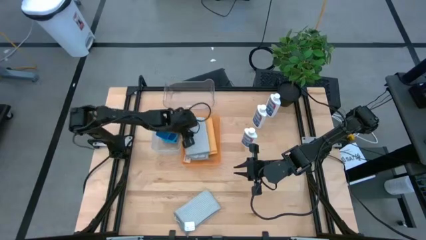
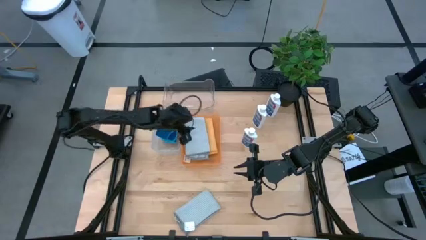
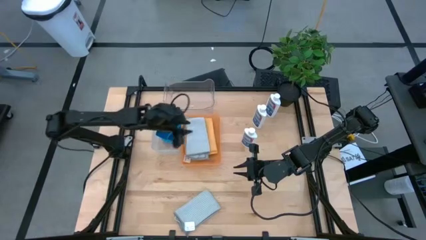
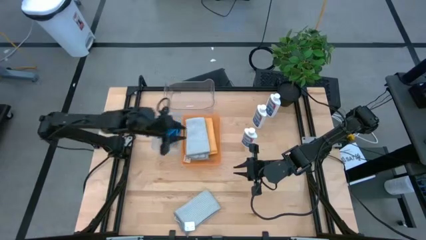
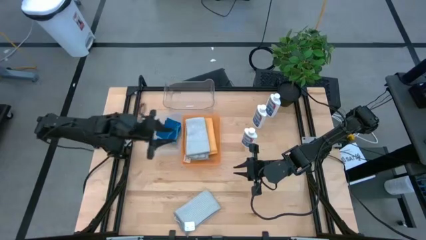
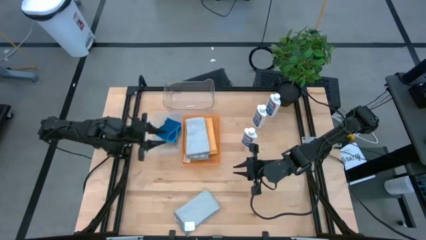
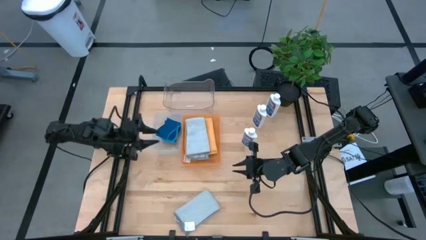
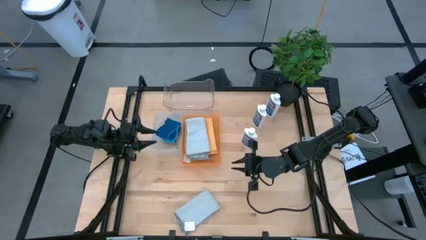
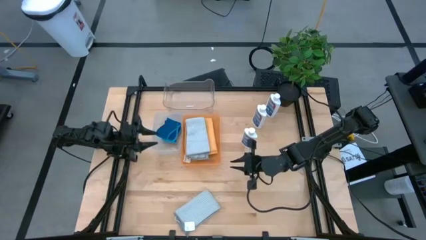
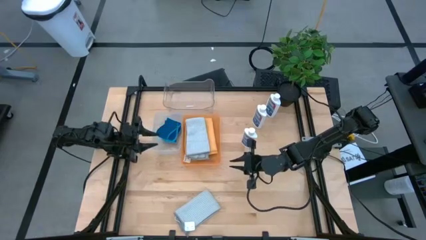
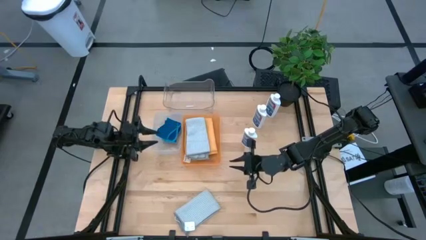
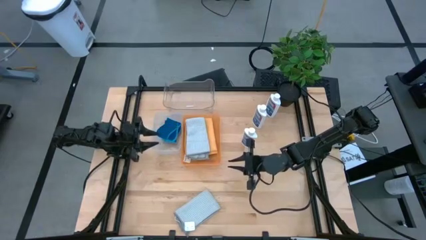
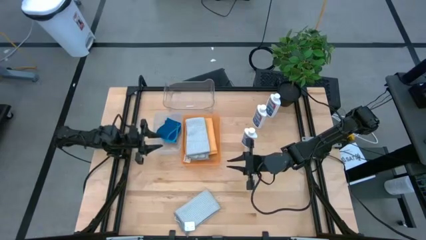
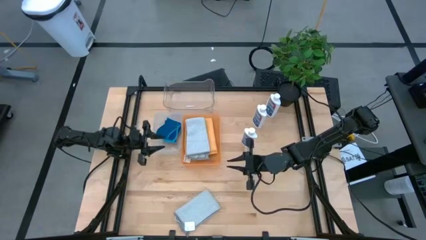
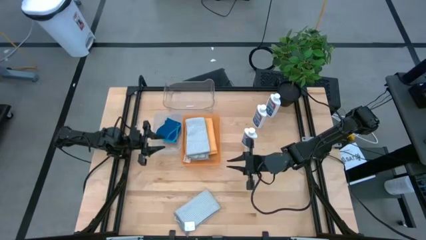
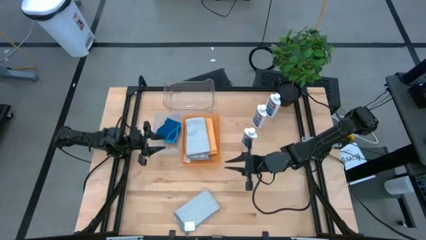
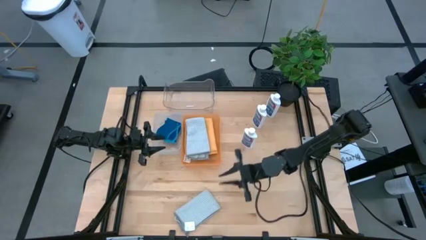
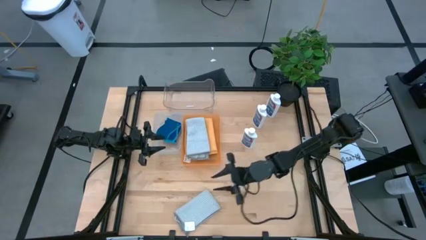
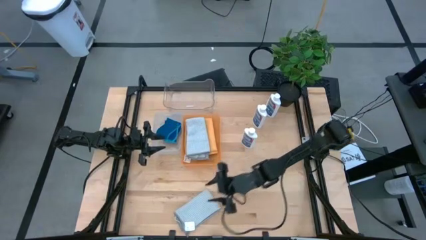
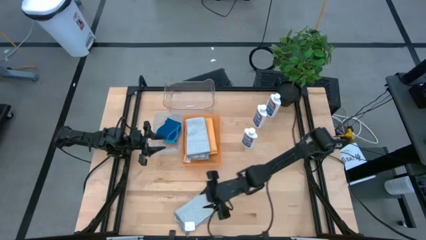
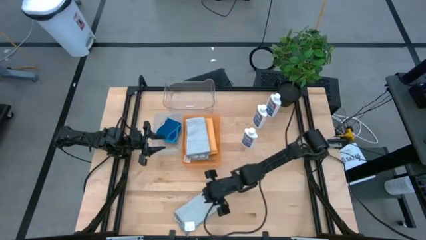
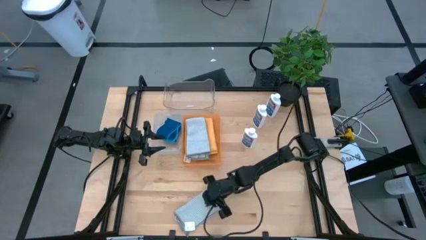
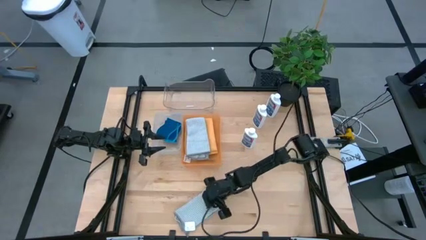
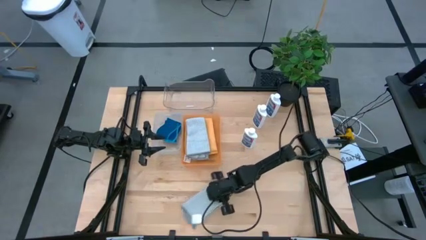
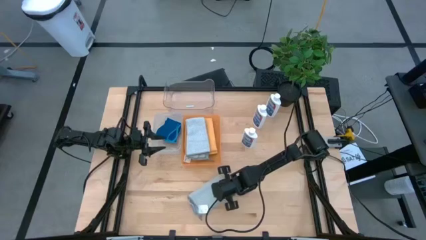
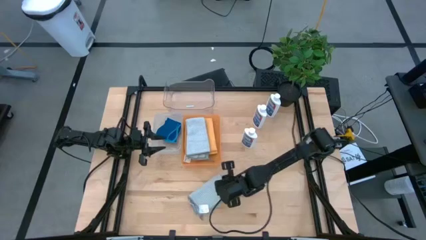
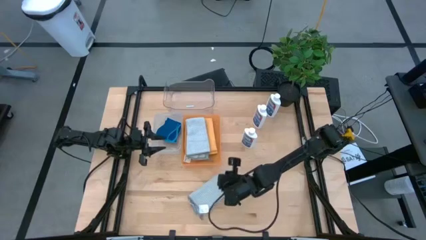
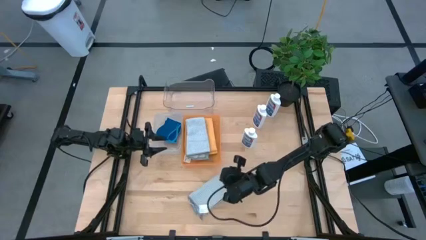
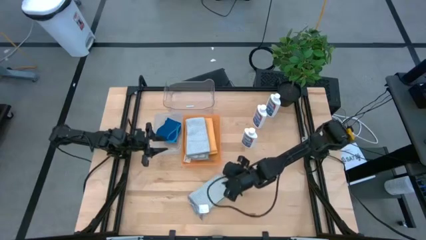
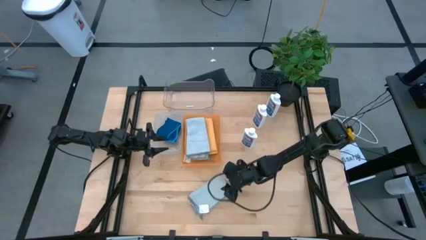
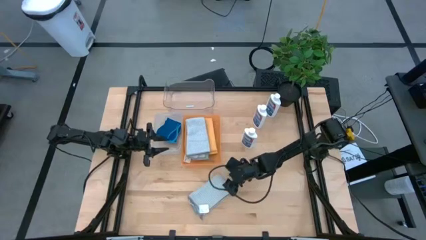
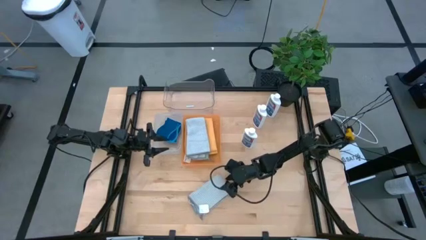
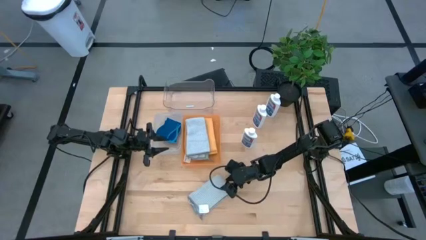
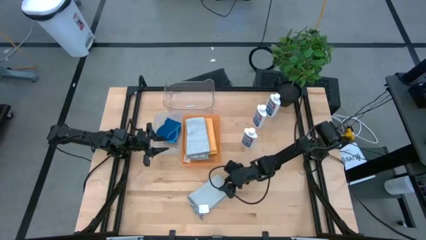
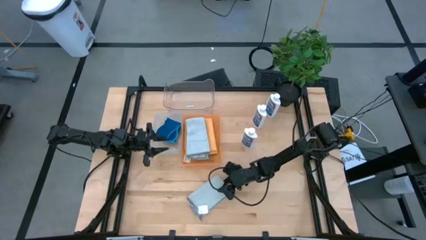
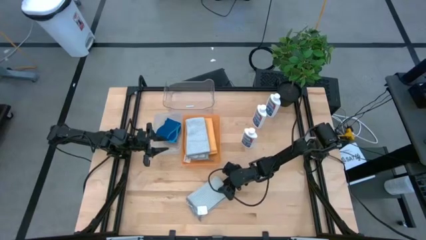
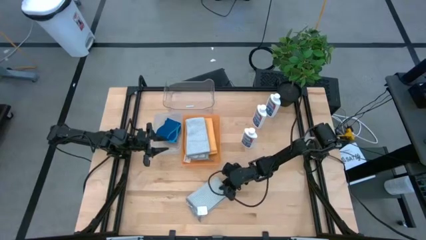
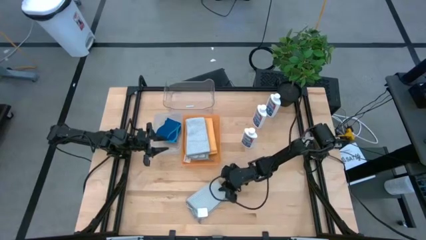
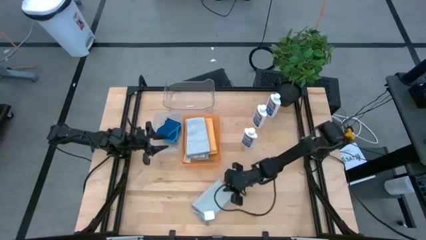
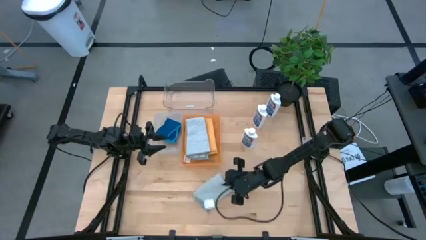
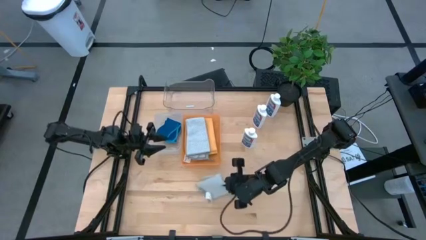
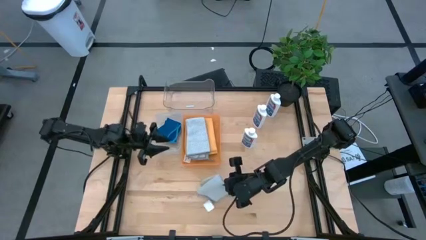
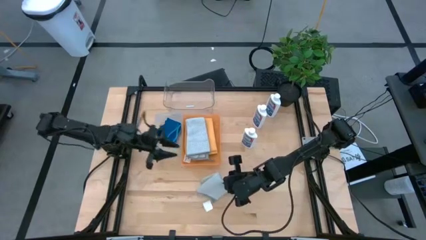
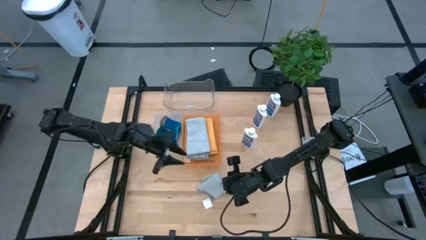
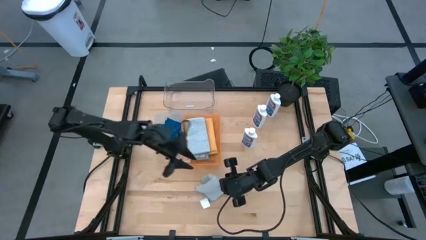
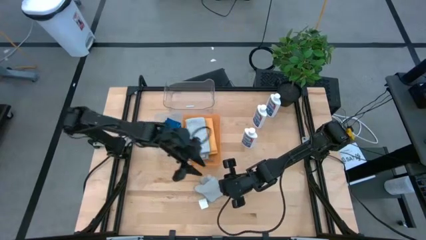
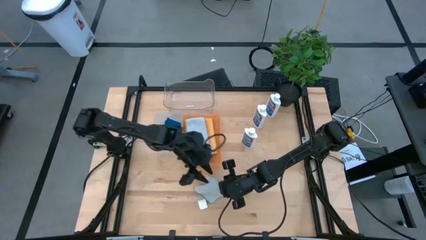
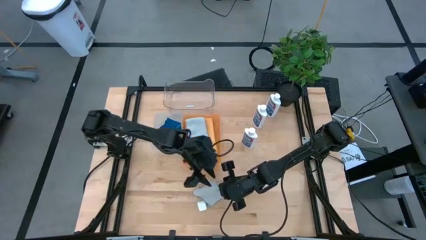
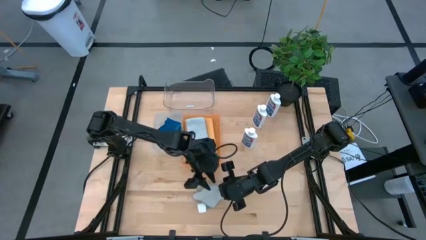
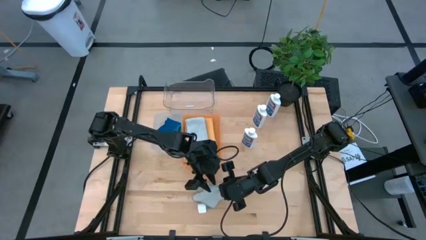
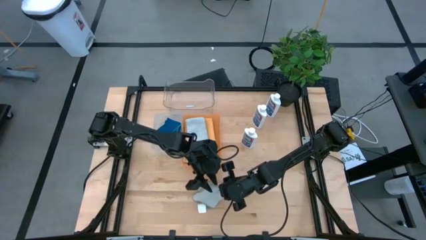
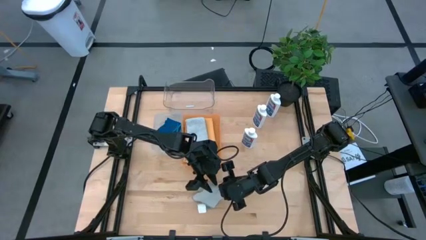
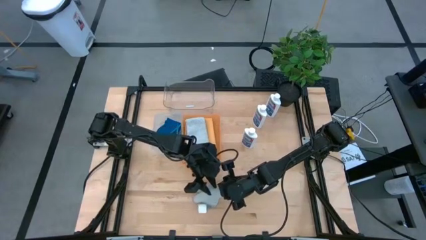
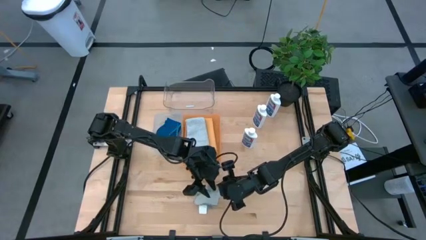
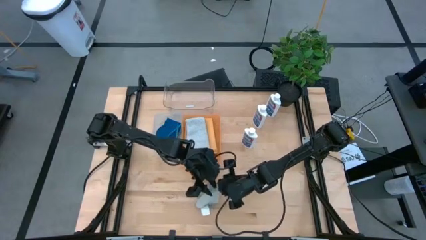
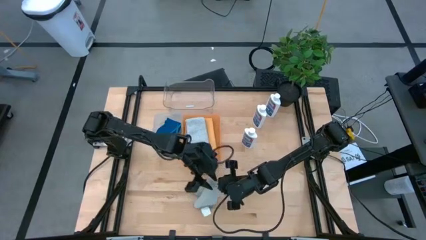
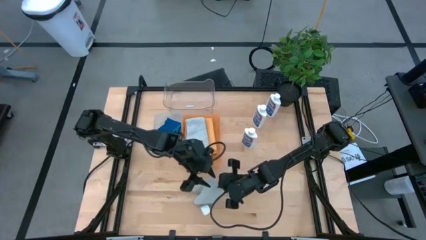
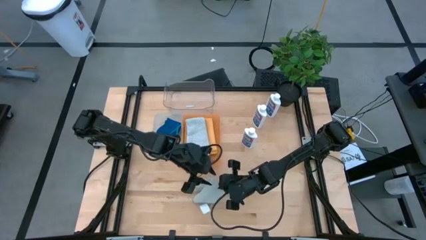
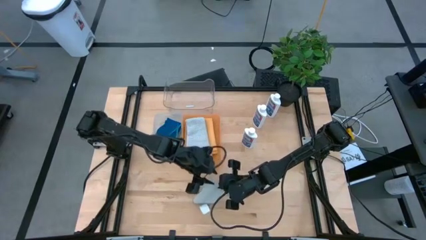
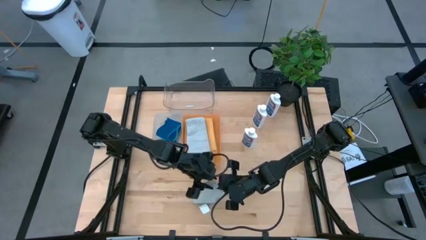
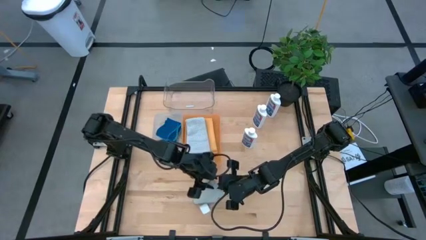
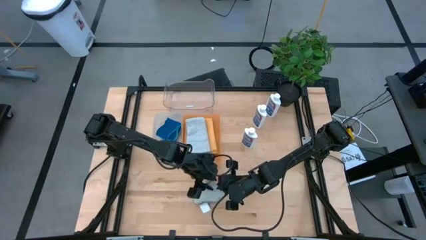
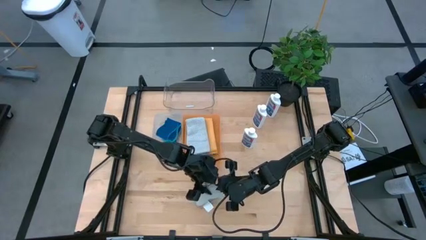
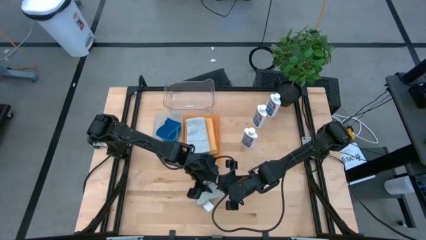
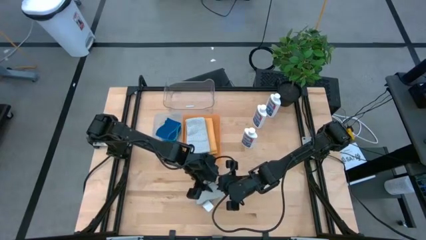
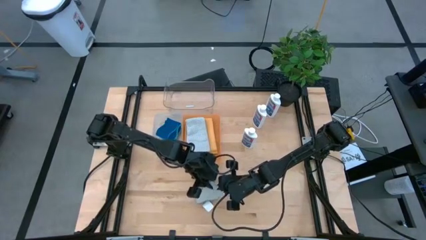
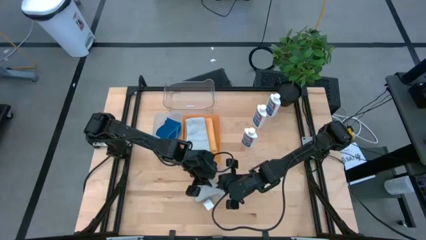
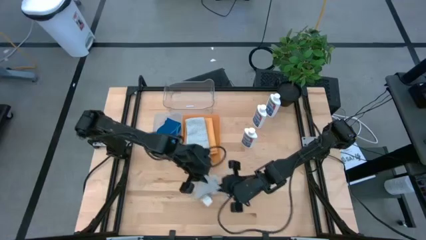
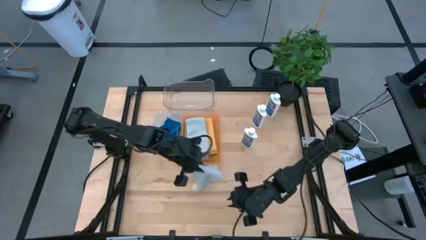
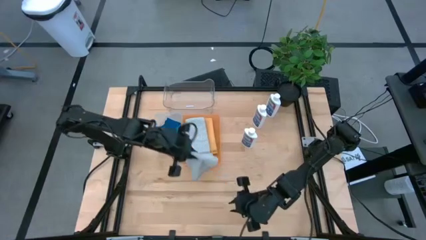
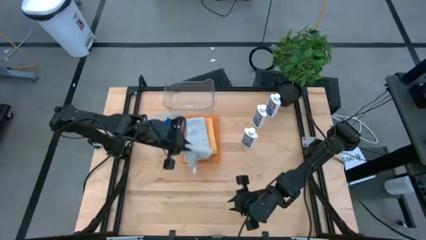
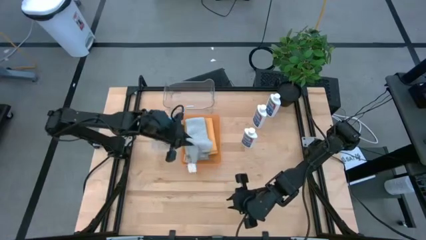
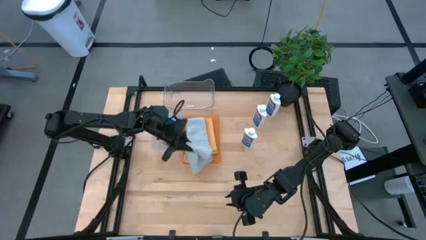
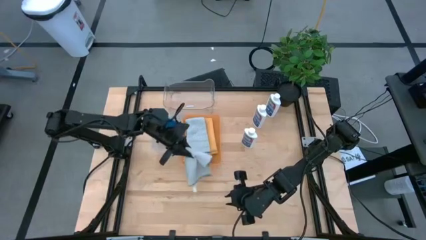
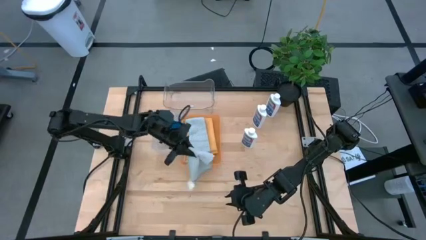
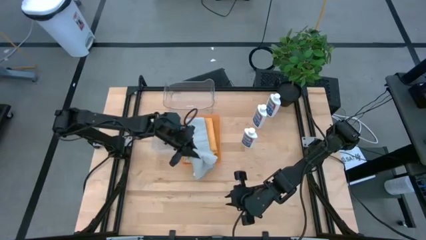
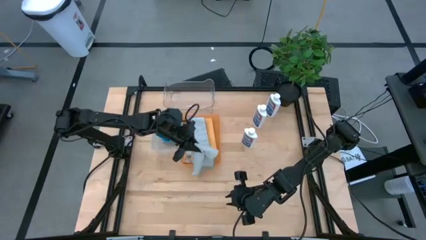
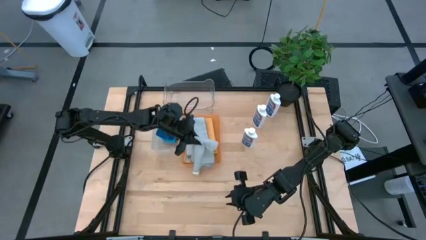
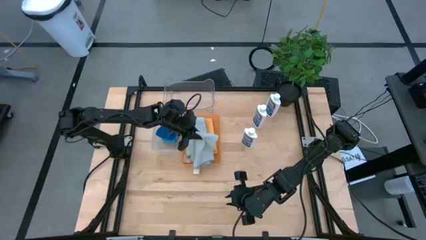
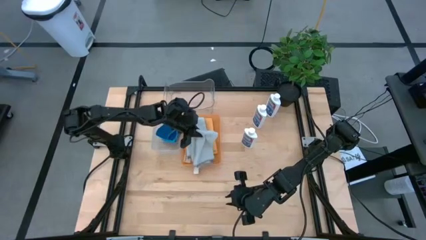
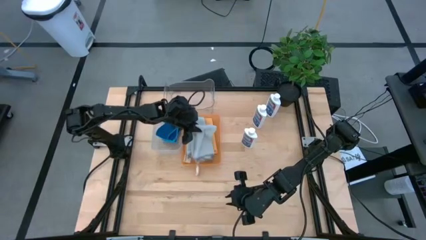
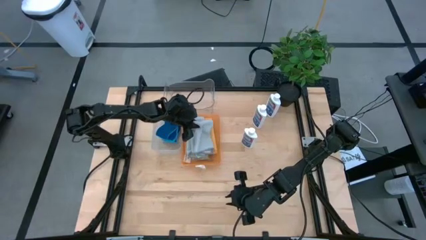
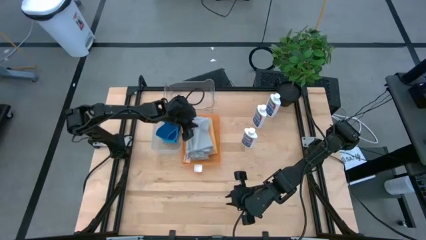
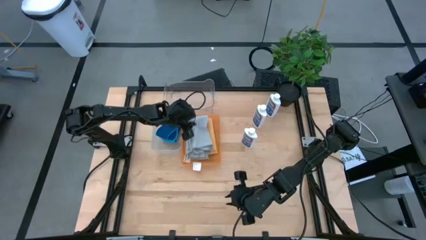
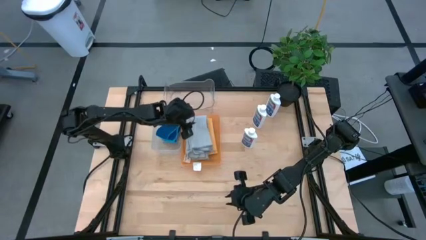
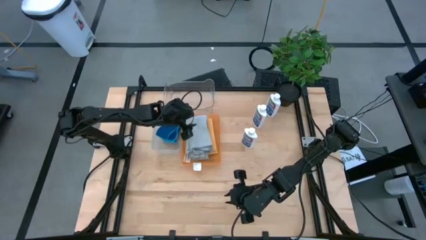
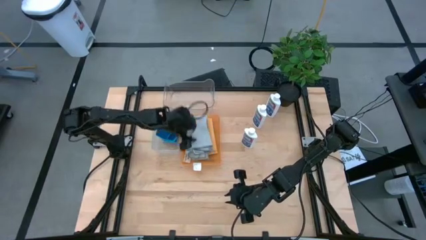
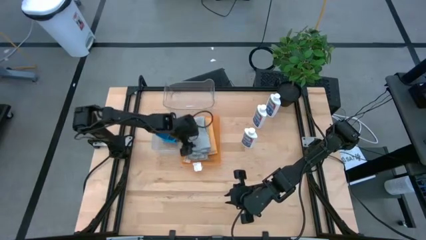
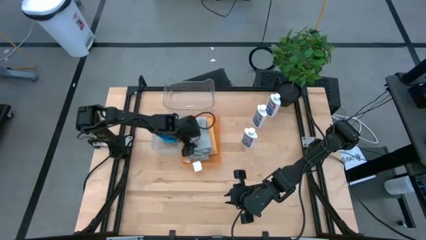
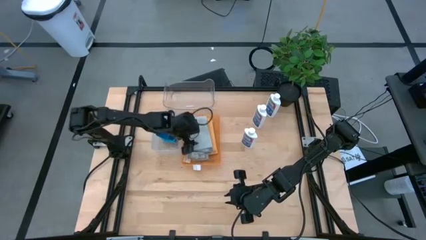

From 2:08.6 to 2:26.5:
Task: Pick & Place Kitchen Items
Put the gray towel into the orange bin
